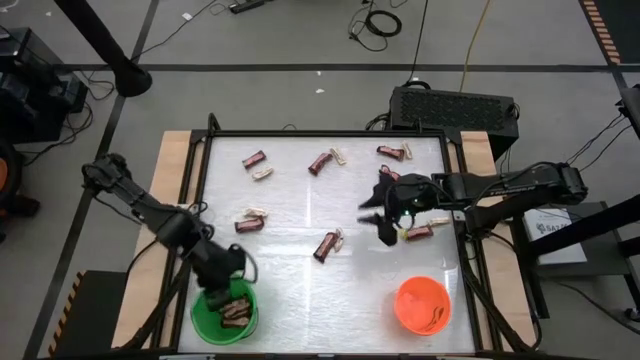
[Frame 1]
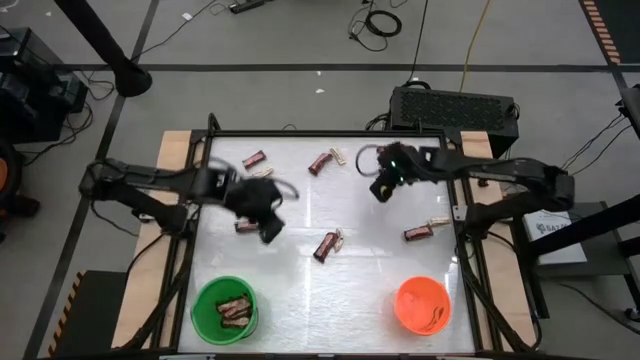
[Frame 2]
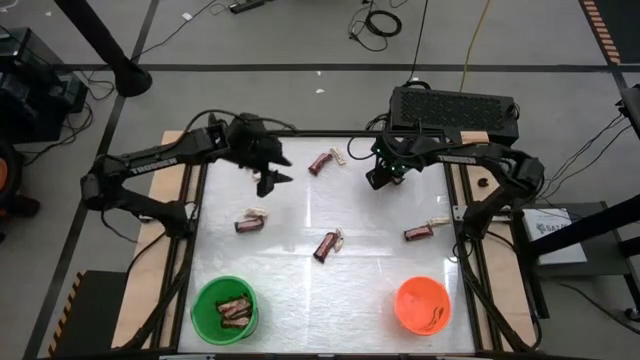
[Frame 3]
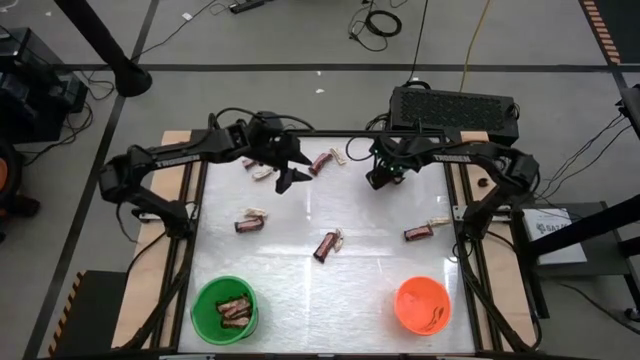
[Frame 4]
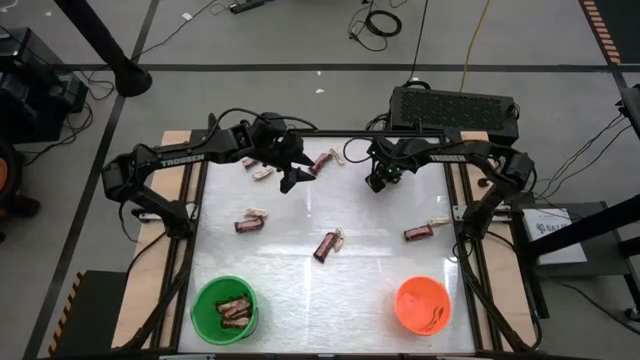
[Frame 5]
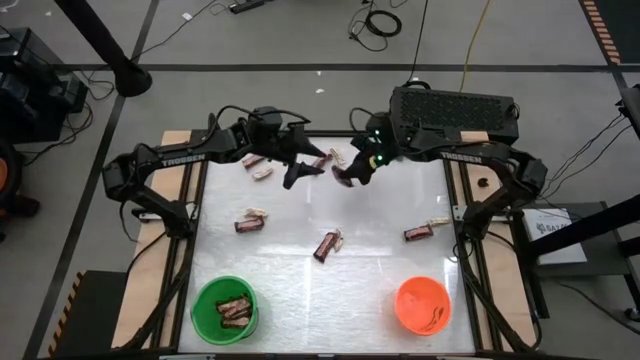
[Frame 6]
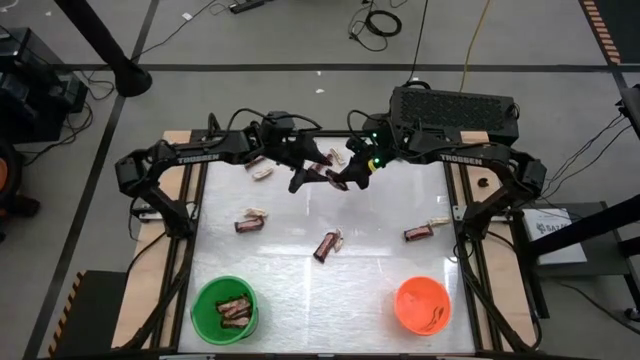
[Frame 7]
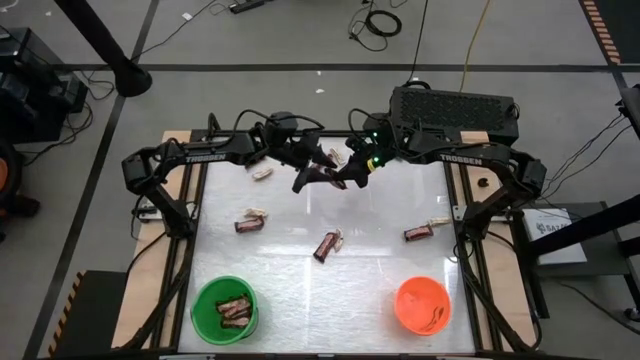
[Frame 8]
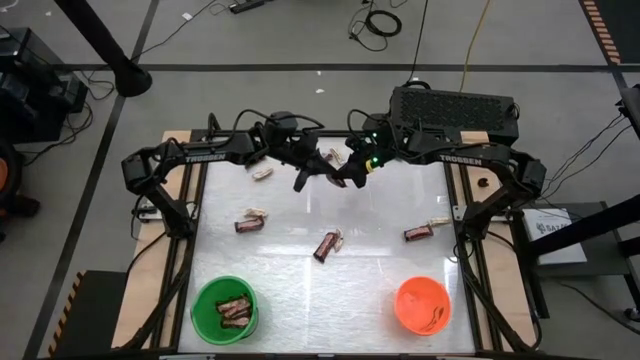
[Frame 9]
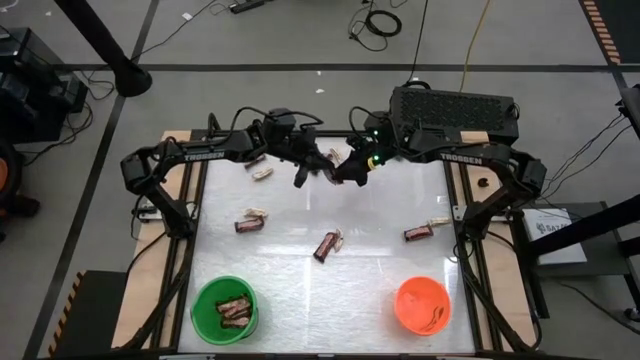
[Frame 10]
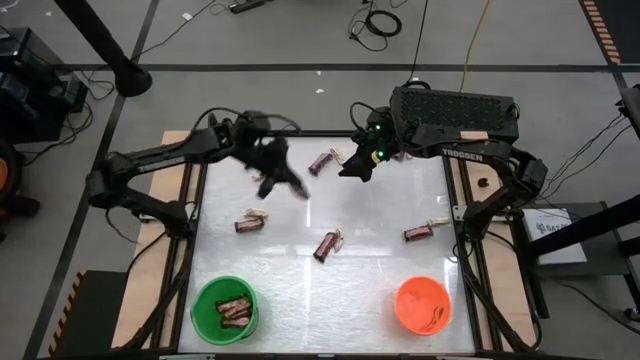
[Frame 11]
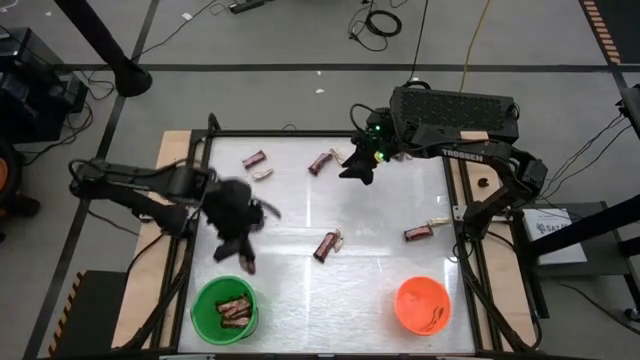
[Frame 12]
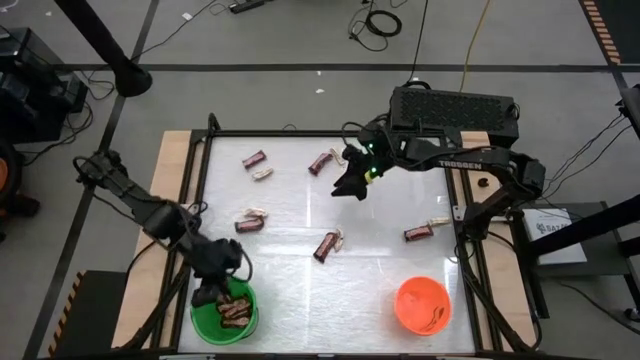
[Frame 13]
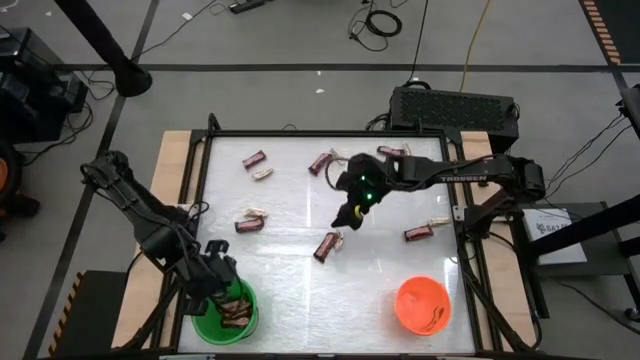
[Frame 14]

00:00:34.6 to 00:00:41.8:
Task: Sort candy by brand, put in halloween buckets
Put the brown chocolate bar into the green bucket

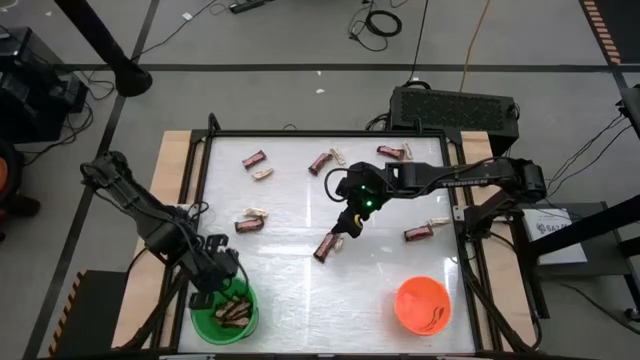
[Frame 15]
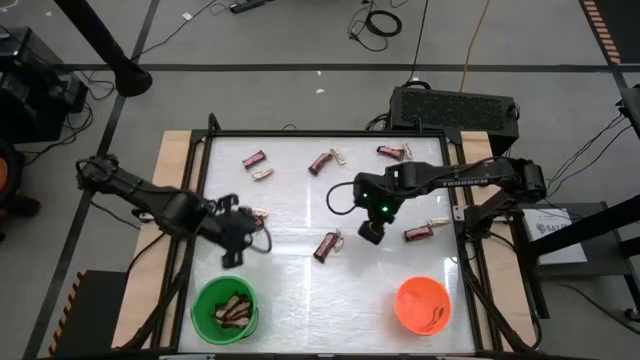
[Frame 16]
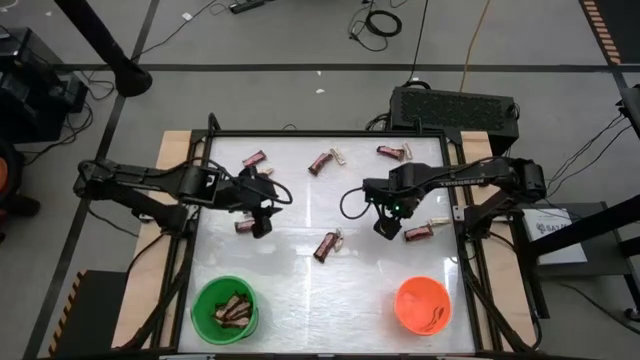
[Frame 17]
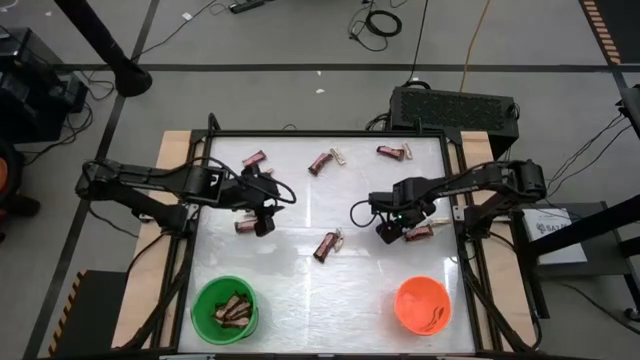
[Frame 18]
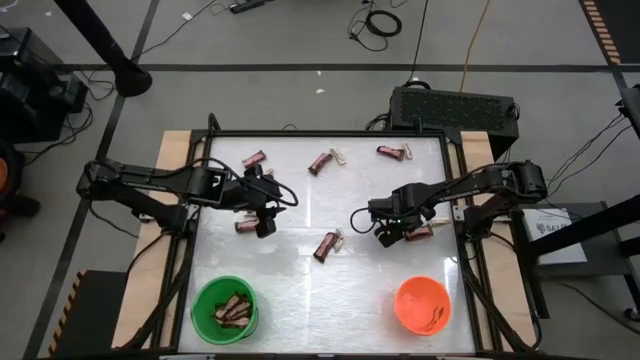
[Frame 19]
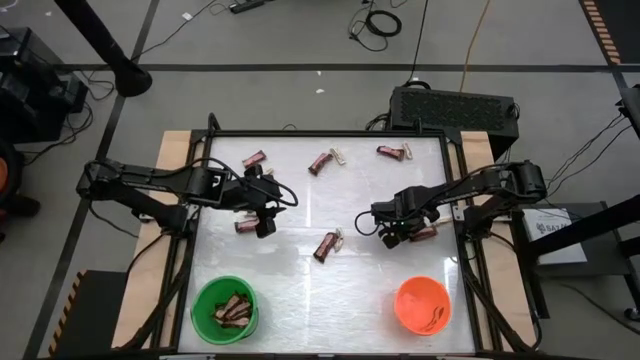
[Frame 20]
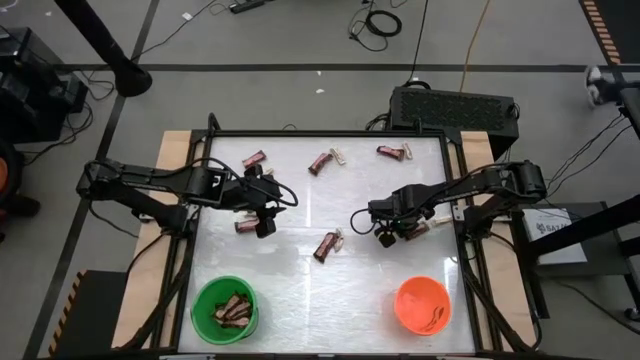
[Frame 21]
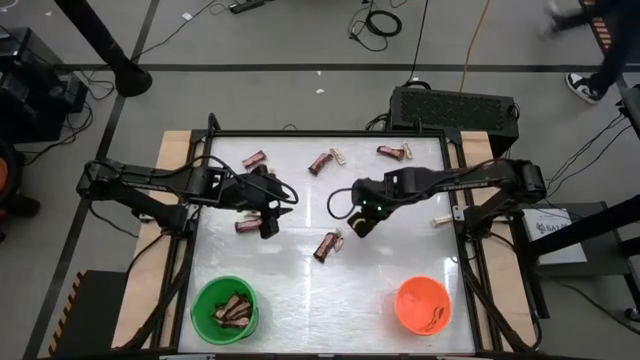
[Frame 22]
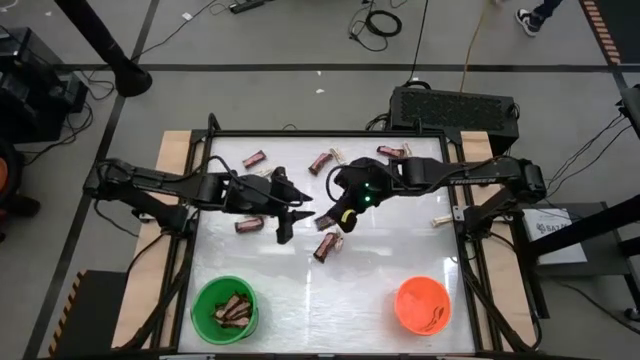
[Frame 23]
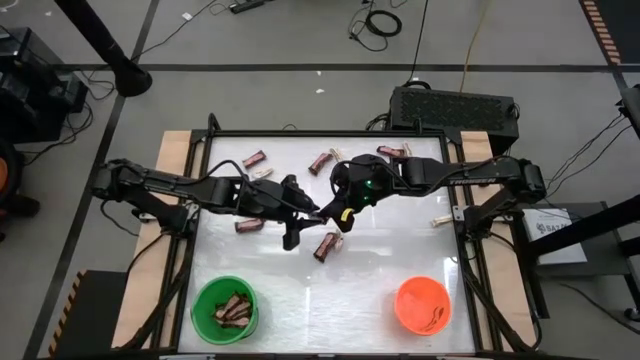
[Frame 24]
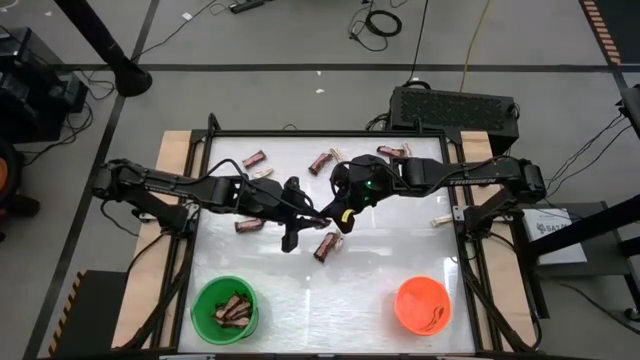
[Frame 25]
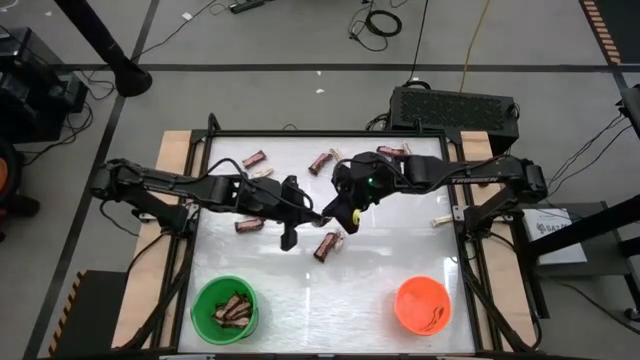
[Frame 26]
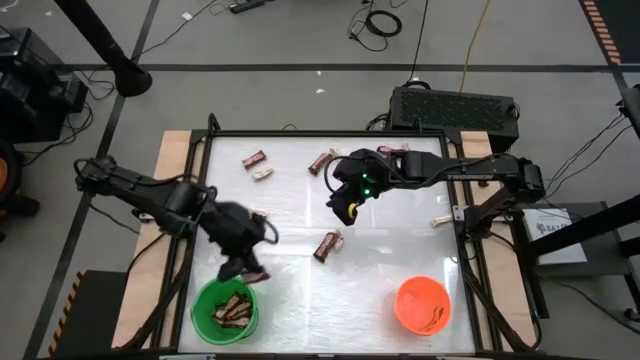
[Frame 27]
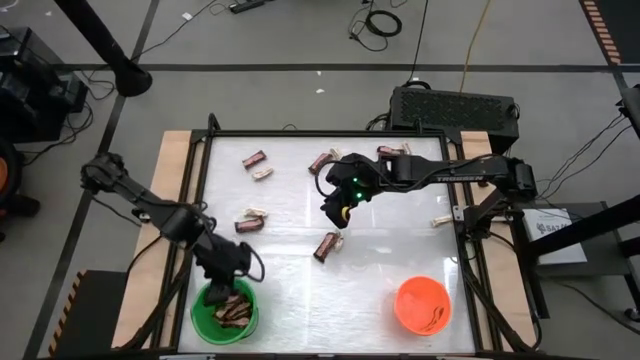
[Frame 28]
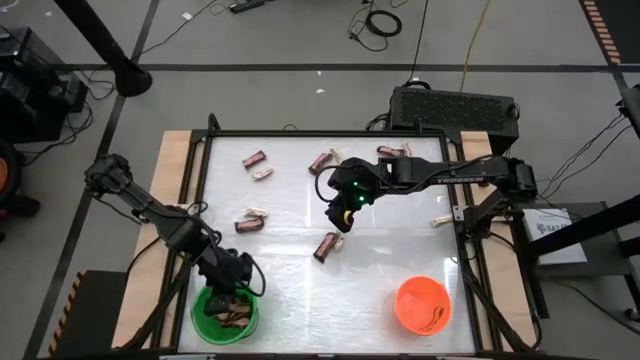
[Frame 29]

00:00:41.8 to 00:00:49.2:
Put the brown chocolate bar into the green bucket

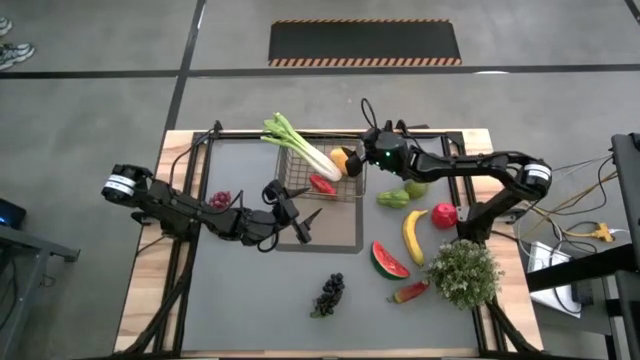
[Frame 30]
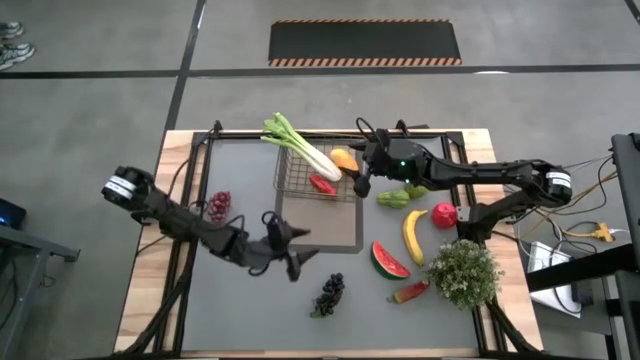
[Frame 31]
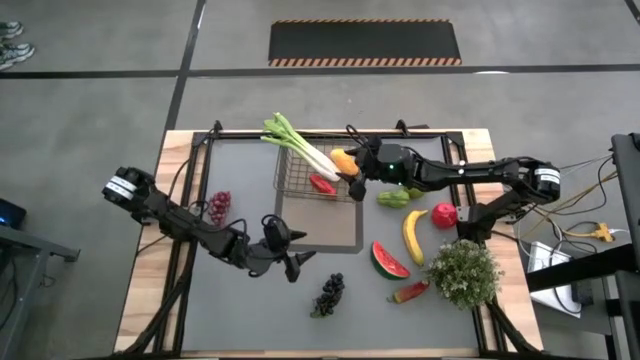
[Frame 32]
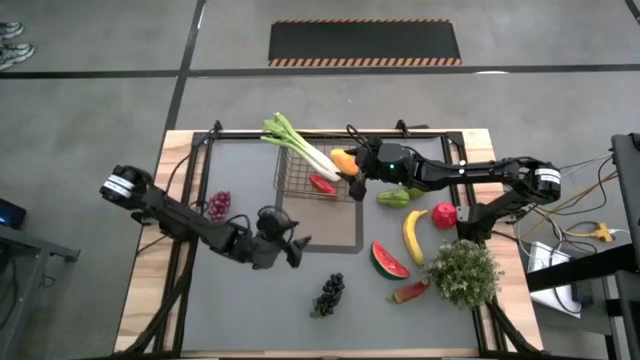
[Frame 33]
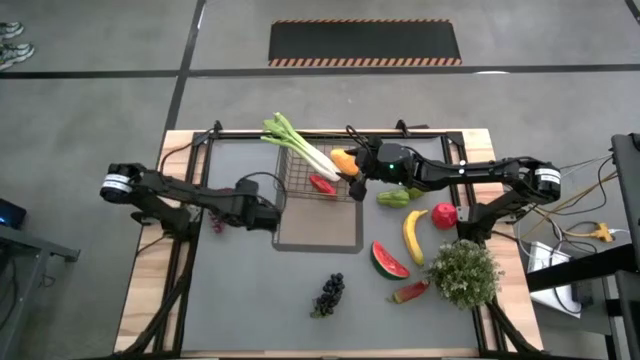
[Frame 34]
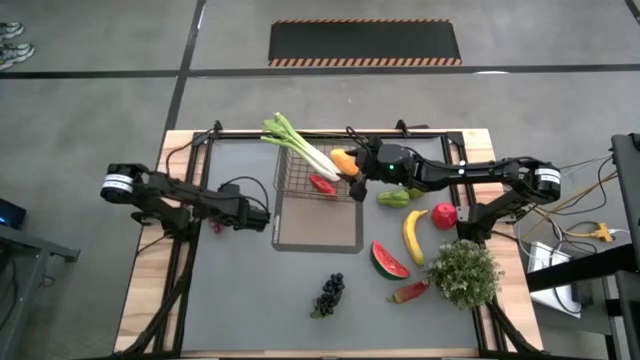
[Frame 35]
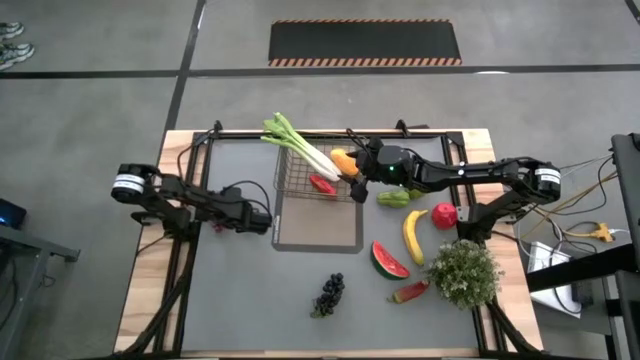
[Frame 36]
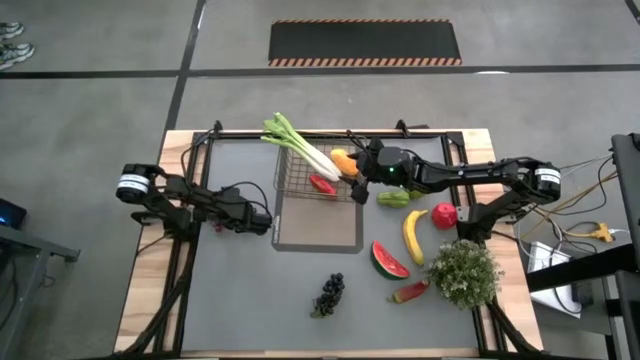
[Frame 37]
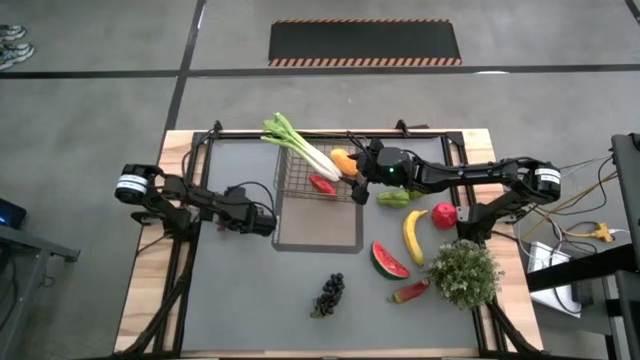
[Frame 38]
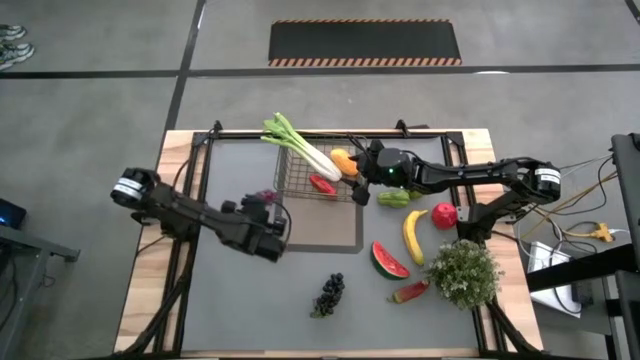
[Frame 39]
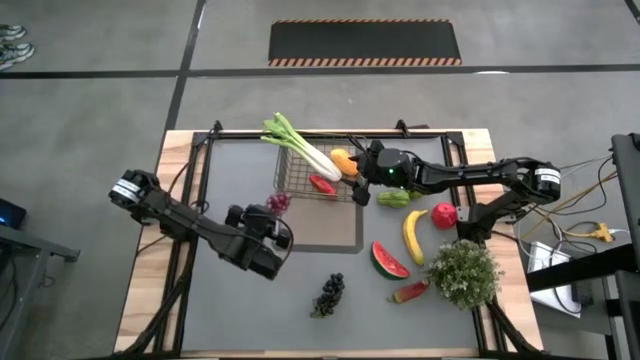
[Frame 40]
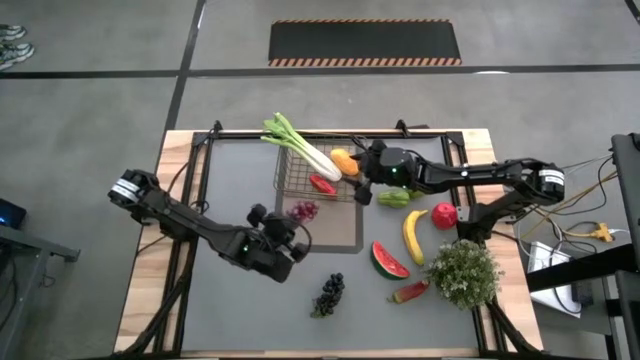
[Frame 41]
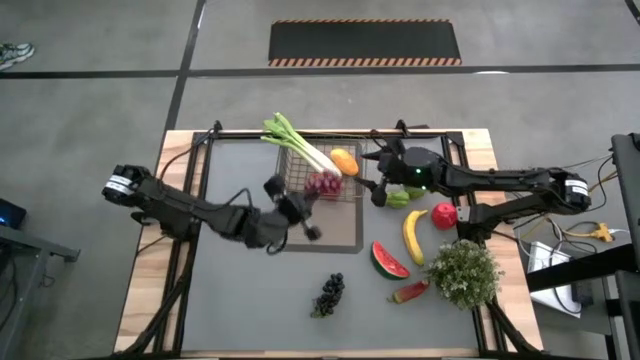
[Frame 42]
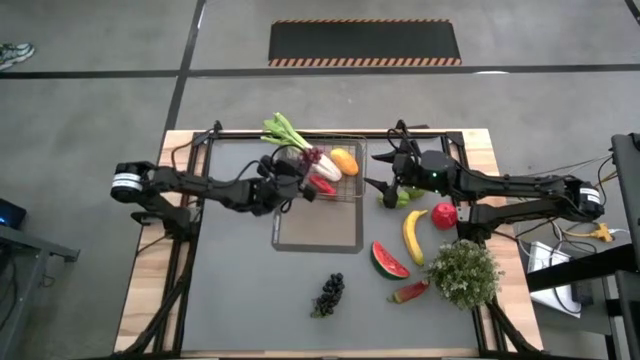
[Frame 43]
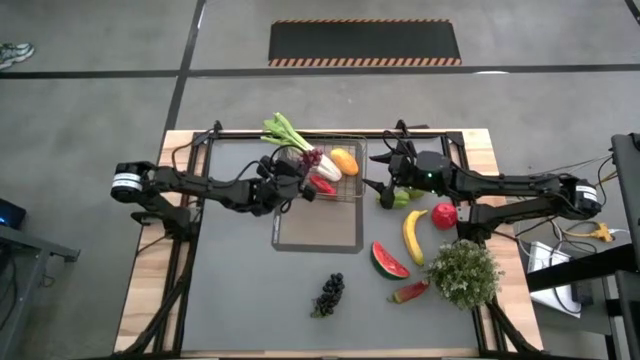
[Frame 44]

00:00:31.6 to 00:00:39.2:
Task: Build produce basket
Put the purple grapes into the wire basket
